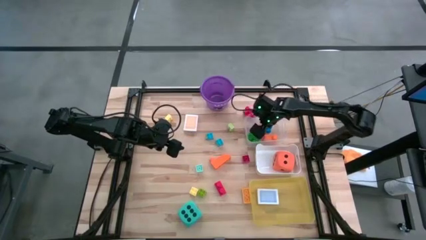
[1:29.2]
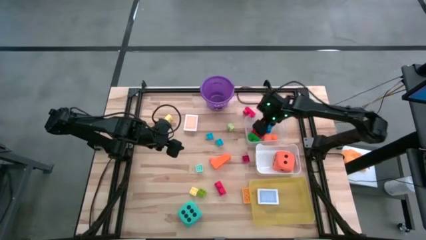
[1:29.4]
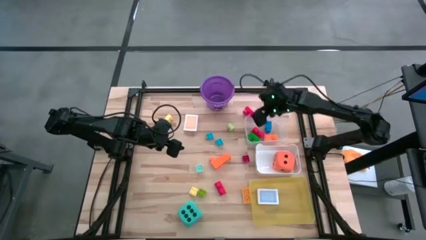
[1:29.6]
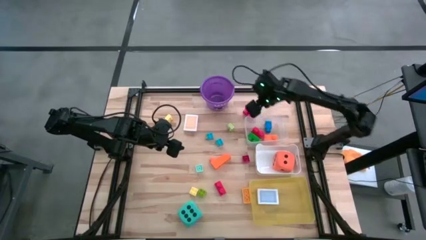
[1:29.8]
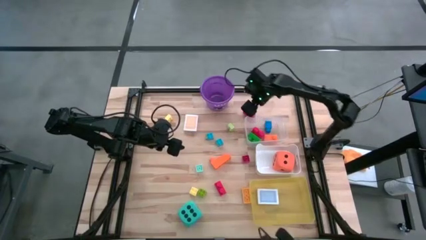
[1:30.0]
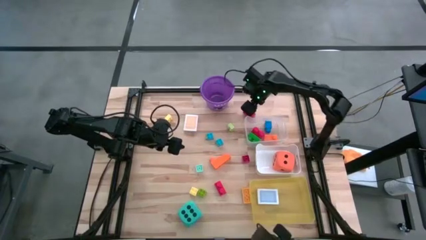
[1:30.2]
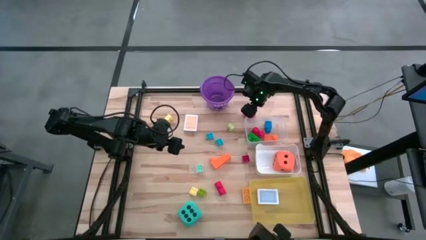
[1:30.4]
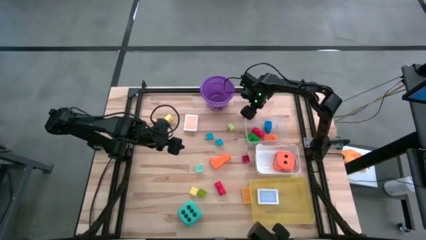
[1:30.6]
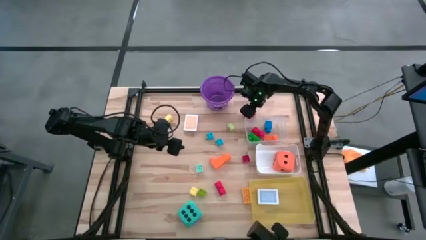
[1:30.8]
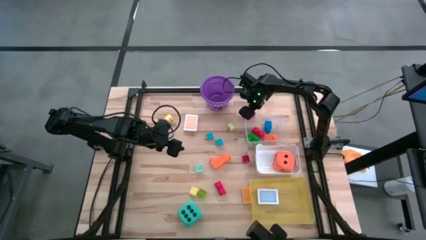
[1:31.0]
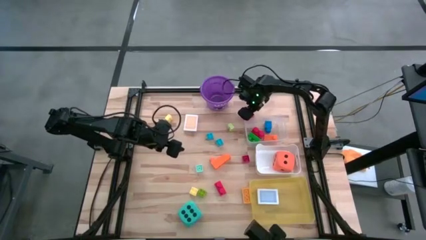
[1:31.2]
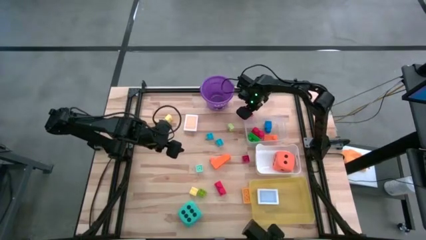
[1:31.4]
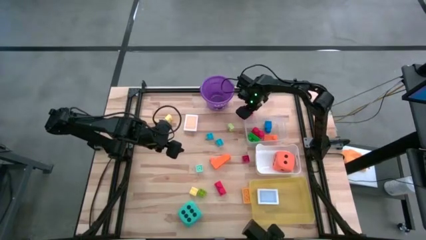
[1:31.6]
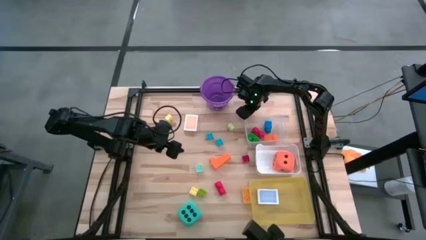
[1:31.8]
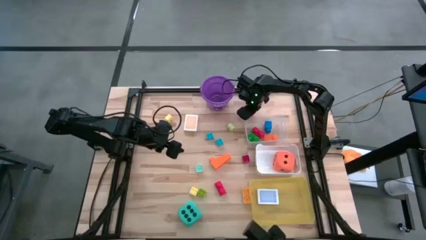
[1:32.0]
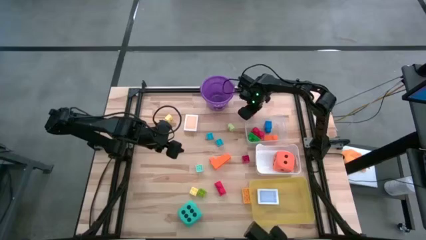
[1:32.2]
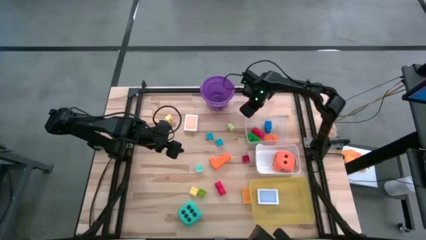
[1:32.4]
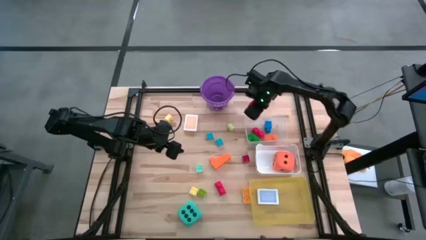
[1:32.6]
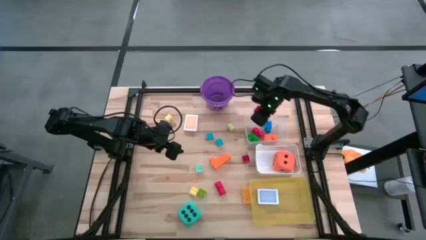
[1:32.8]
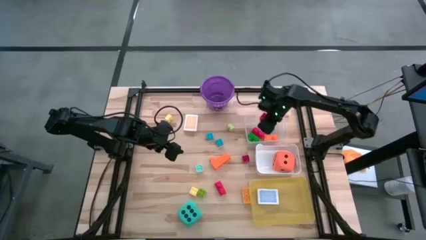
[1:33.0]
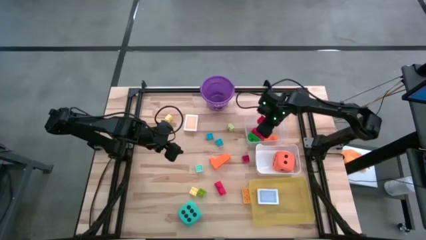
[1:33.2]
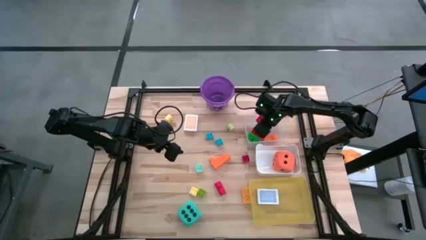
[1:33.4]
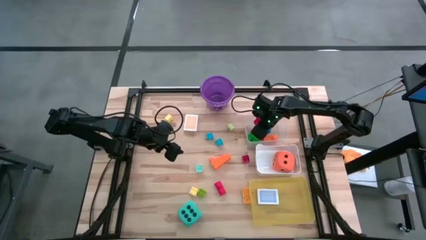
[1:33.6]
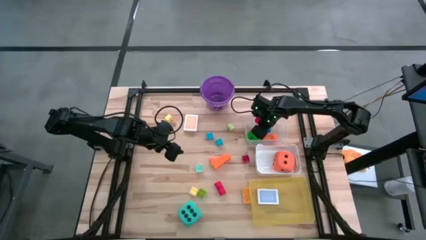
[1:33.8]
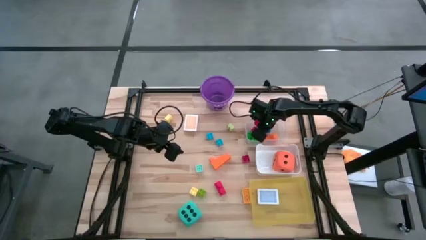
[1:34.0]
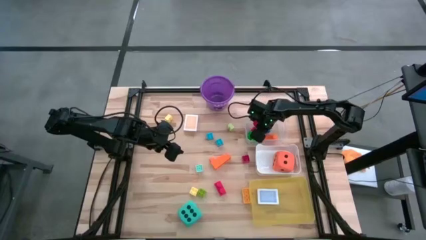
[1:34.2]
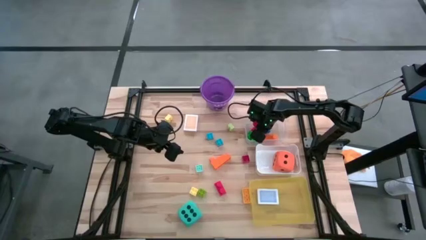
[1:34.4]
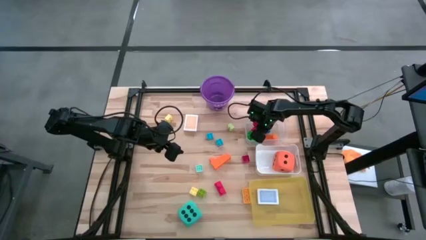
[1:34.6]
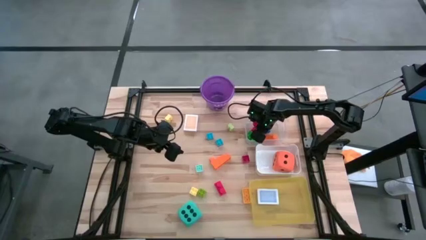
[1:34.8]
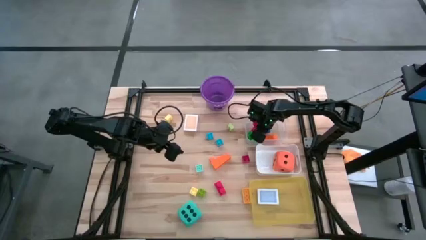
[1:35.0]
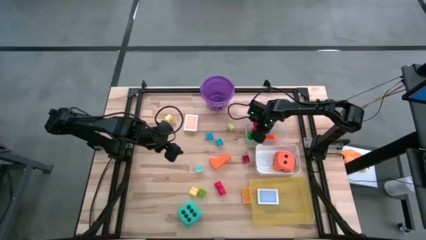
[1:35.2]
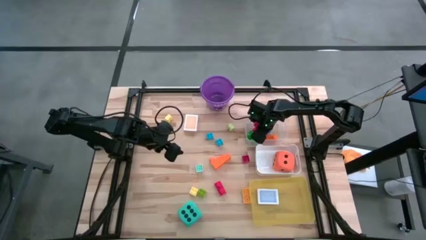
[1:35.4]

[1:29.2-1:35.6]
Task: Pick & Place Toys
Put the red game piece into the transparent bin

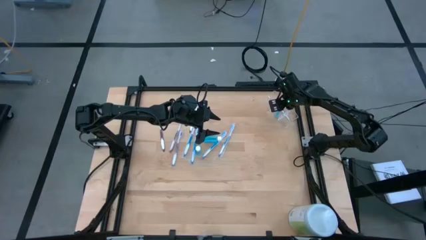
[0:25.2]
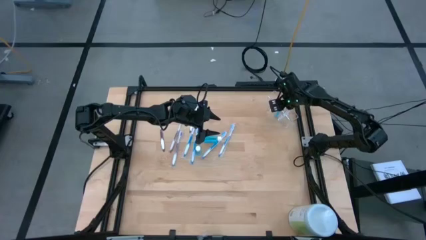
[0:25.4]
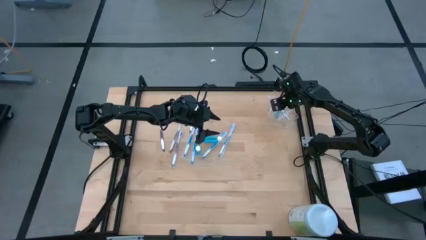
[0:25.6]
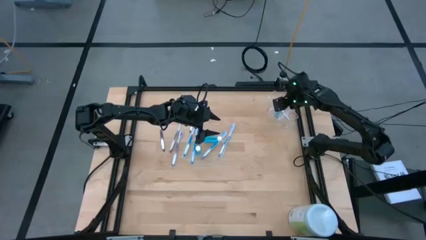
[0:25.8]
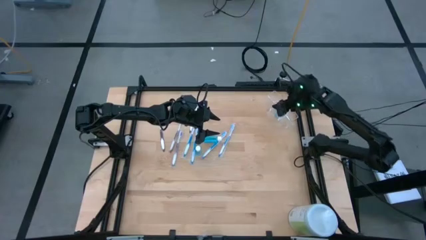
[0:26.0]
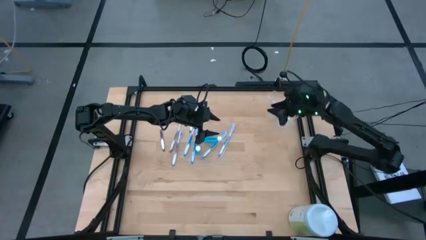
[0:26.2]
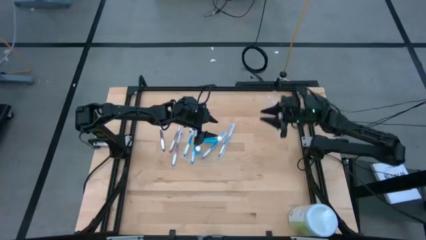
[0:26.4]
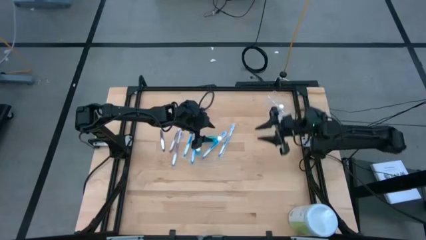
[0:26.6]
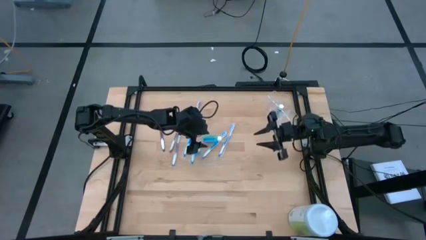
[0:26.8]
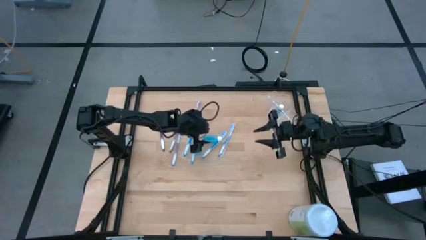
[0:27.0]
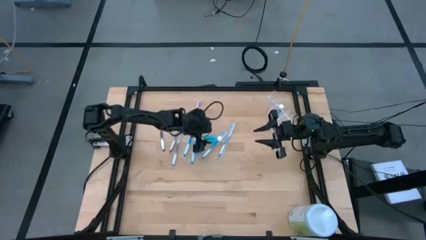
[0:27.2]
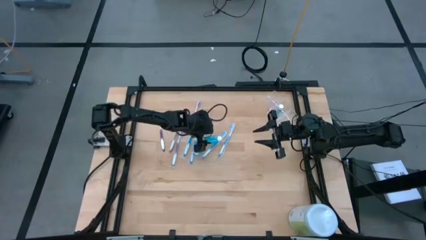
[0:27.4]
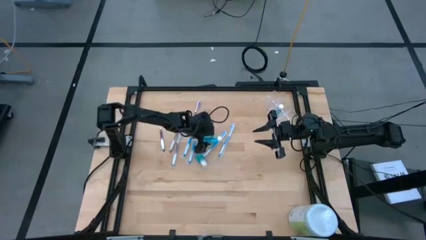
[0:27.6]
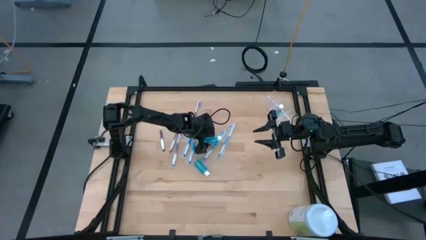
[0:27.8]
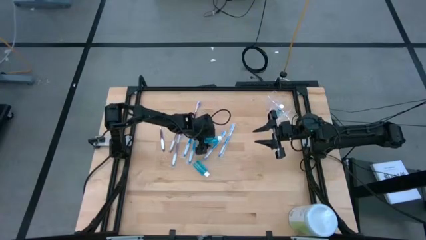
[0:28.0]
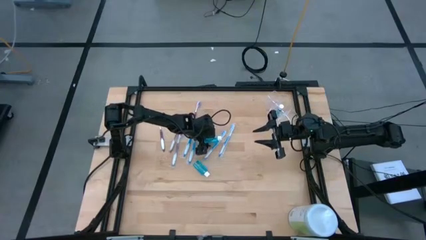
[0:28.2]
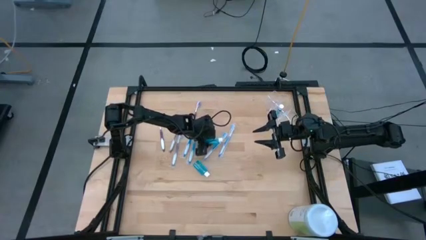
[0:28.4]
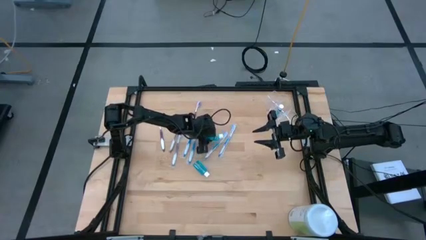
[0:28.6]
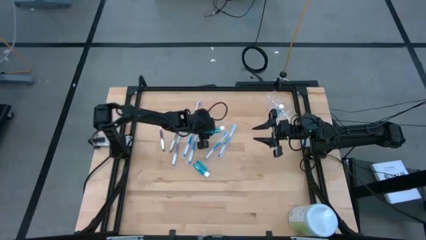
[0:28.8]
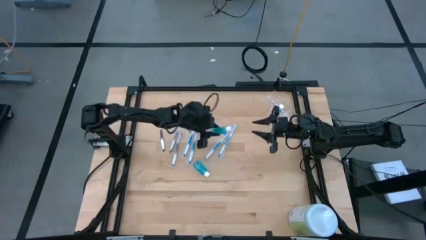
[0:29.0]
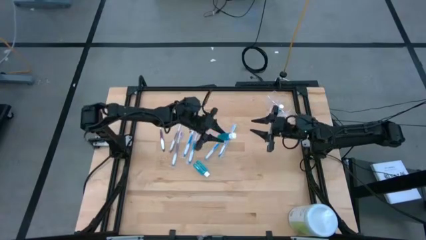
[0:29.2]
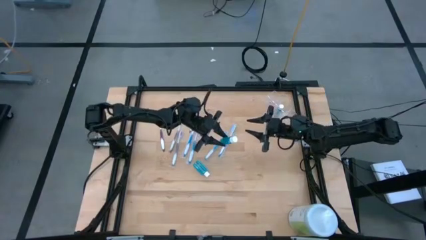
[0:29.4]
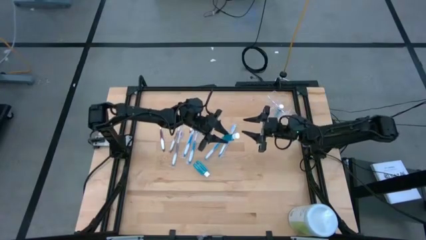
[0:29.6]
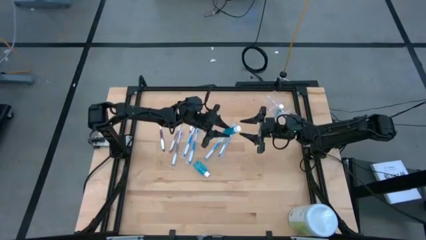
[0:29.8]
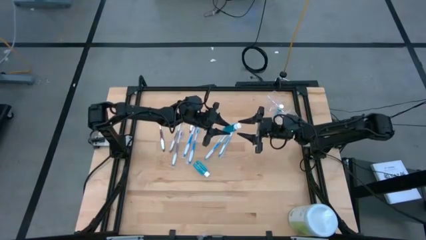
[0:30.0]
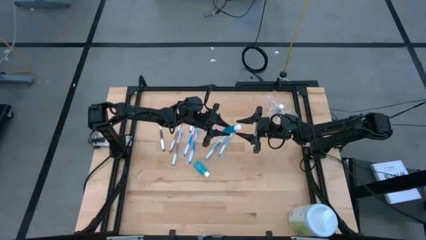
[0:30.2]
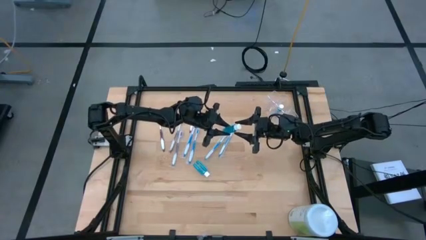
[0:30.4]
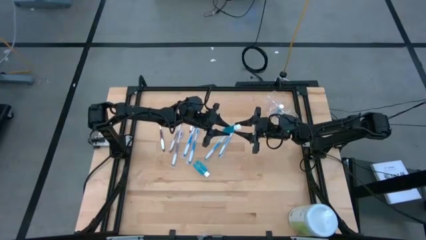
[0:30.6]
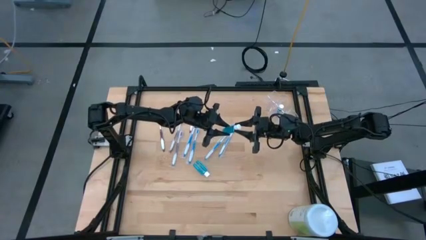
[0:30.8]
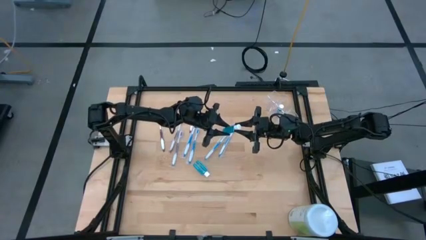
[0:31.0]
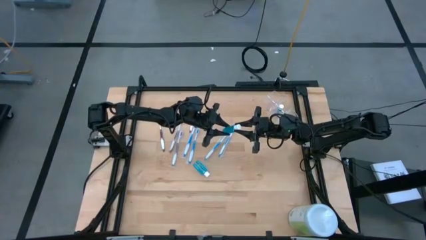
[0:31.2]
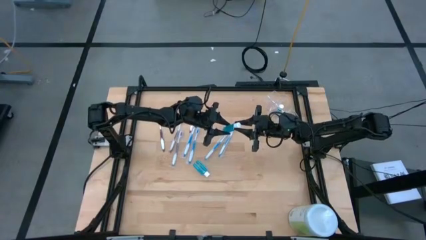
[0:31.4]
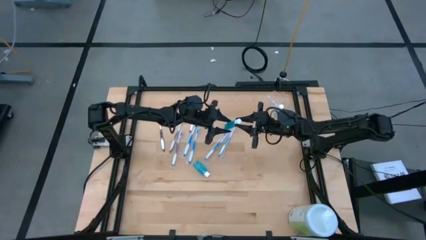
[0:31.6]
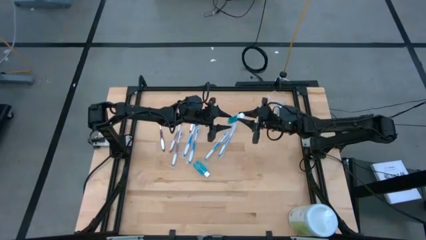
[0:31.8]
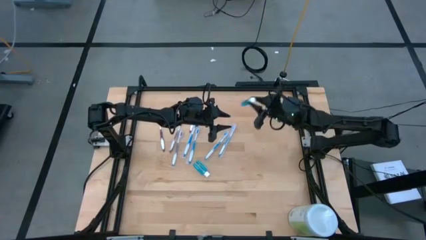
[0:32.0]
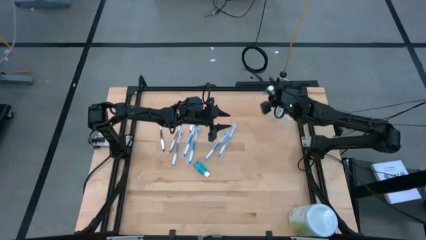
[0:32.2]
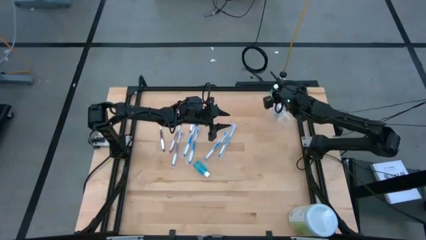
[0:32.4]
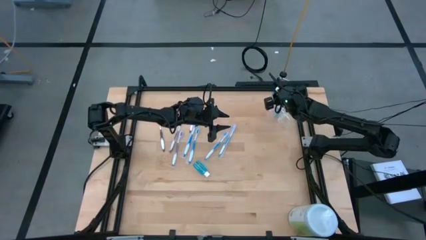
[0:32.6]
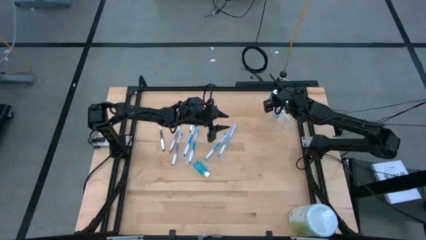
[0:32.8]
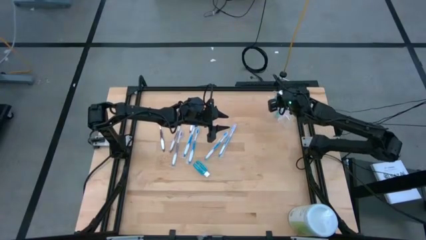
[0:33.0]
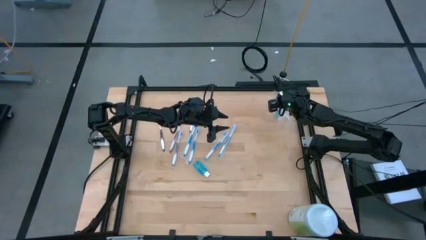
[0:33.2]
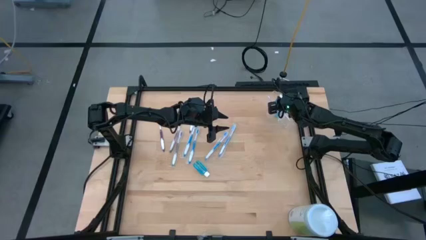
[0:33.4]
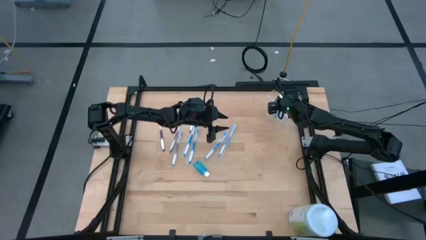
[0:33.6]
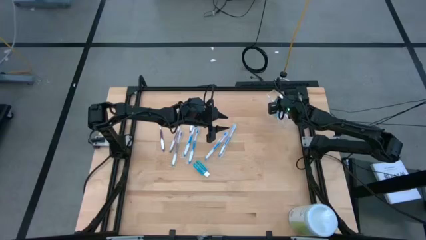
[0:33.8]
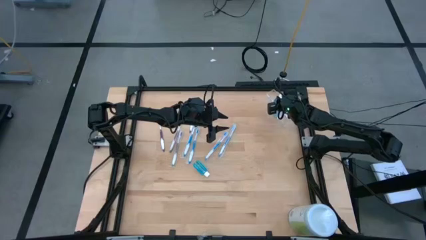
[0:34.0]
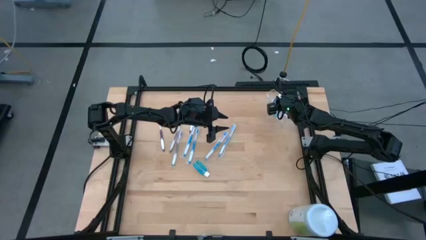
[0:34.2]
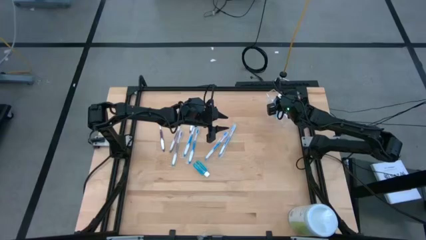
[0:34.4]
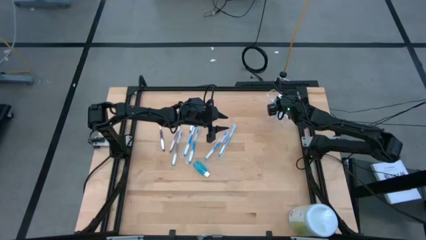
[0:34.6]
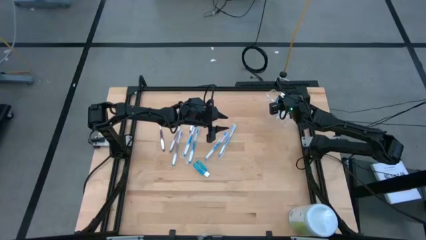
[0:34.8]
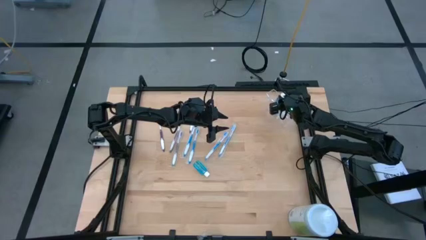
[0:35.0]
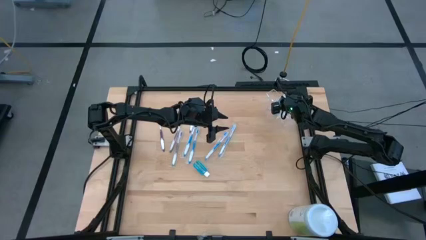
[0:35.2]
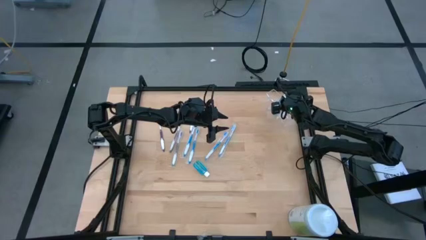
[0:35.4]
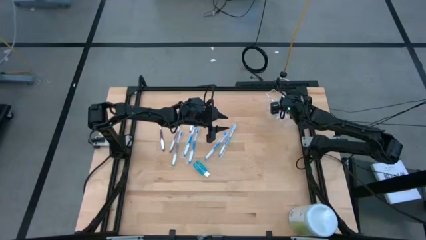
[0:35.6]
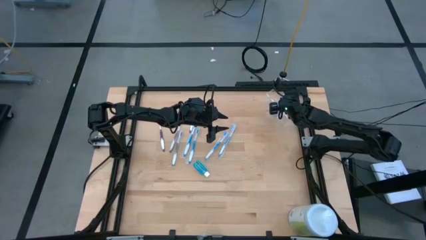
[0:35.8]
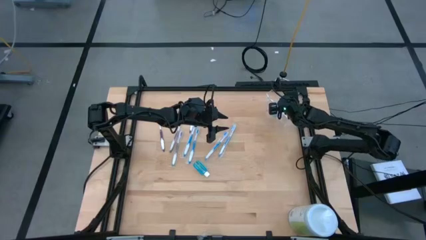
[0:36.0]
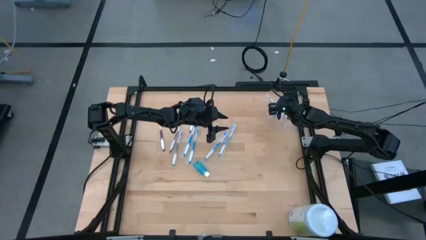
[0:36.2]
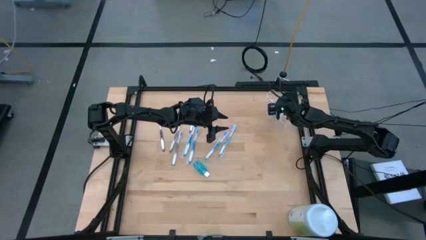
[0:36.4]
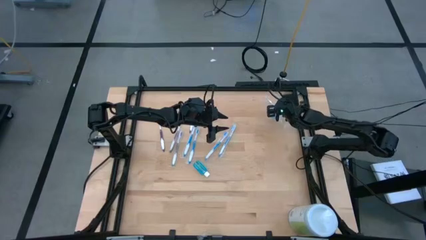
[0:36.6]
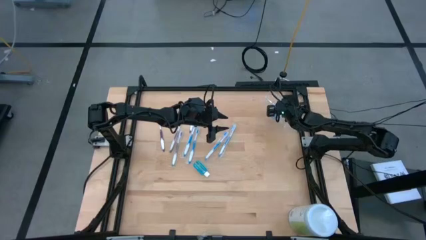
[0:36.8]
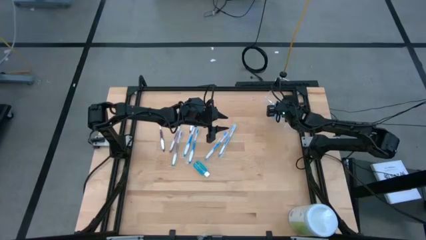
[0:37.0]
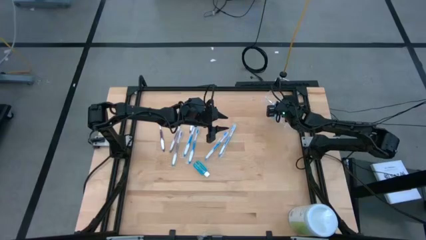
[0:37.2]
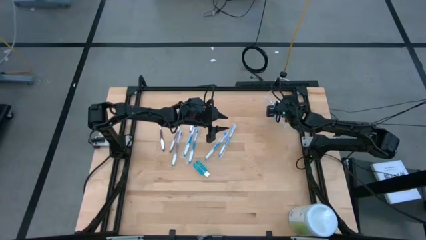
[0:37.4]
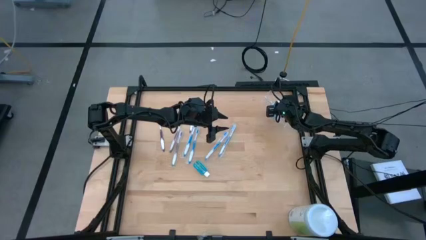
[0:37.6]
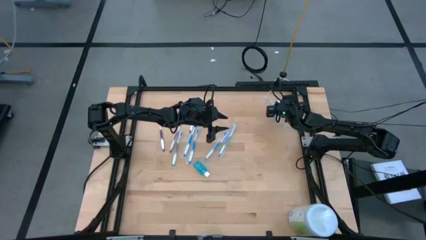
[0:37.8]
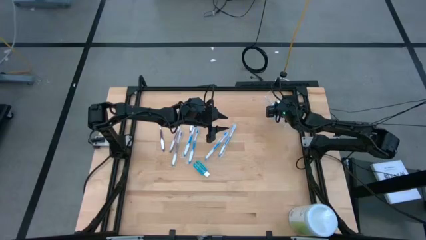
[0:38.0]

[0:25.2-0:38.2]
Task: Pick & Place toothbrushing station
Put the blue mouthwash into the middle of the transparent organizer
